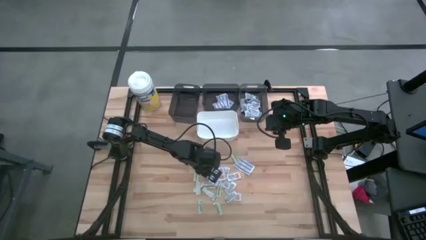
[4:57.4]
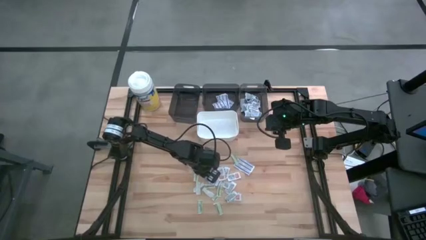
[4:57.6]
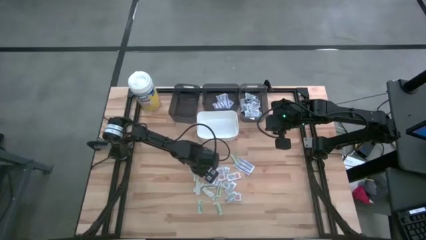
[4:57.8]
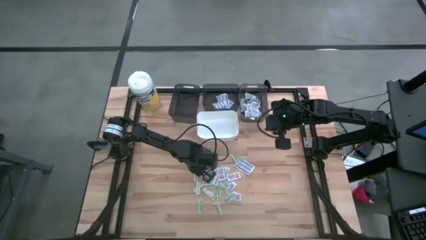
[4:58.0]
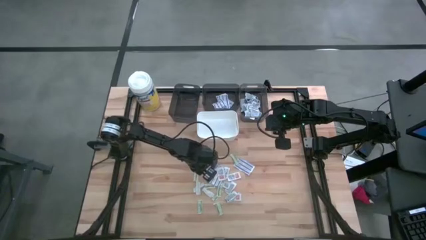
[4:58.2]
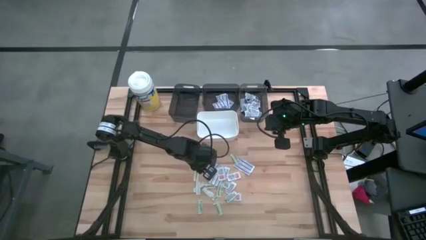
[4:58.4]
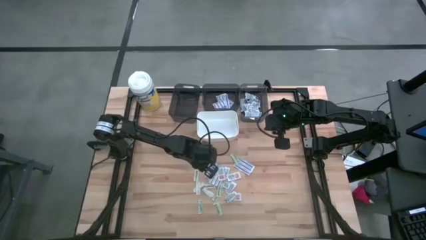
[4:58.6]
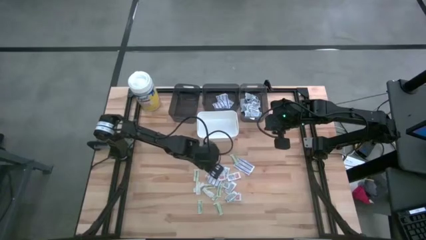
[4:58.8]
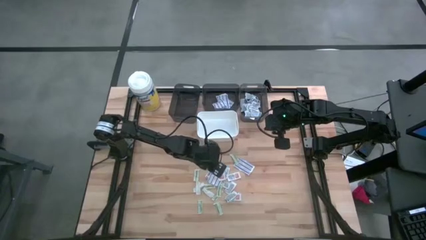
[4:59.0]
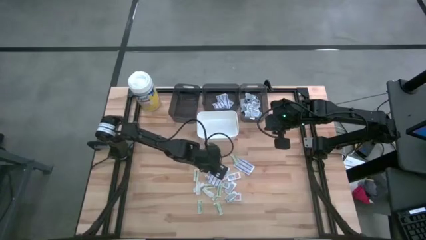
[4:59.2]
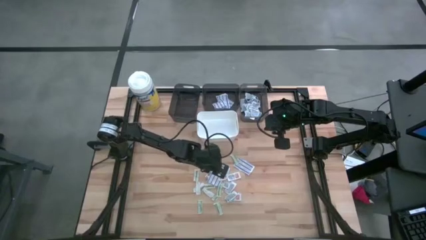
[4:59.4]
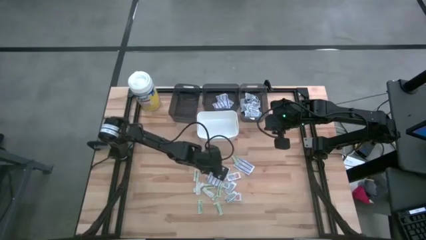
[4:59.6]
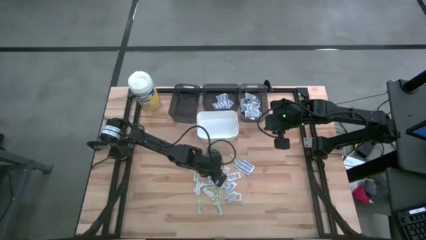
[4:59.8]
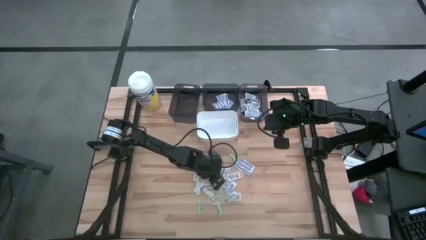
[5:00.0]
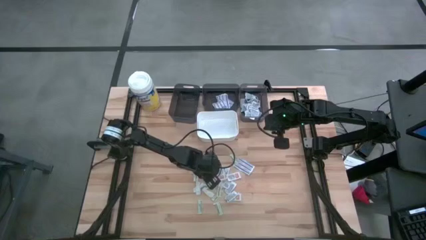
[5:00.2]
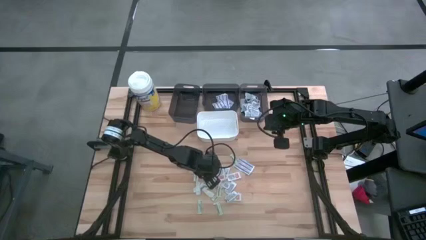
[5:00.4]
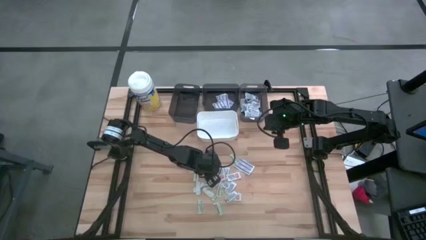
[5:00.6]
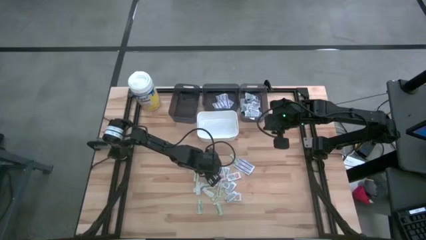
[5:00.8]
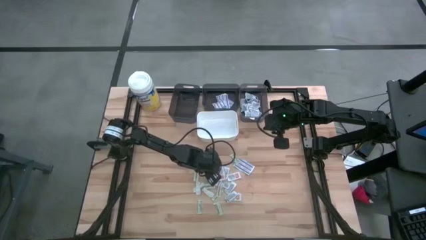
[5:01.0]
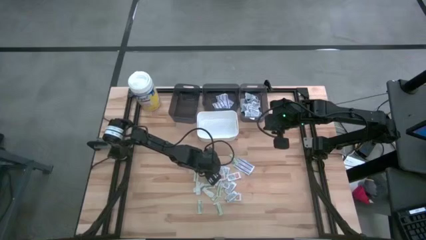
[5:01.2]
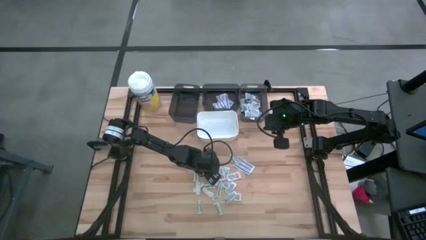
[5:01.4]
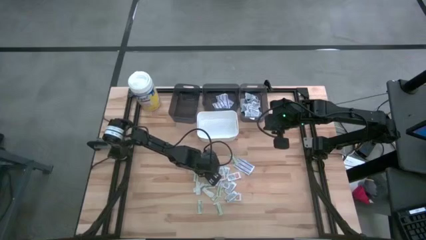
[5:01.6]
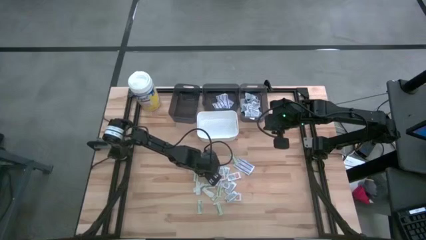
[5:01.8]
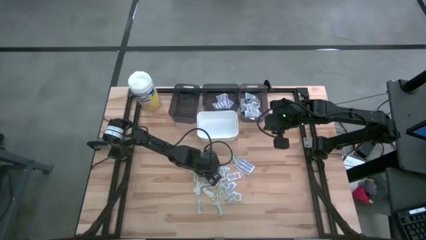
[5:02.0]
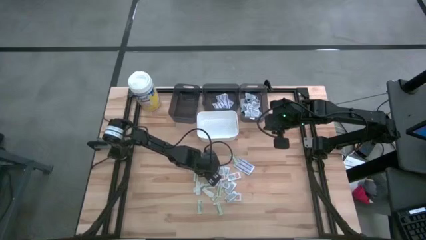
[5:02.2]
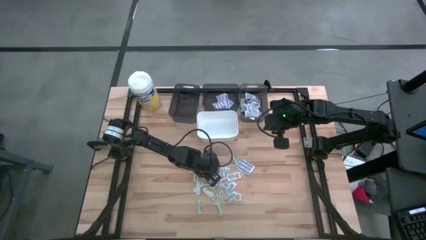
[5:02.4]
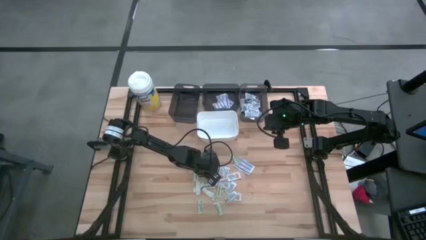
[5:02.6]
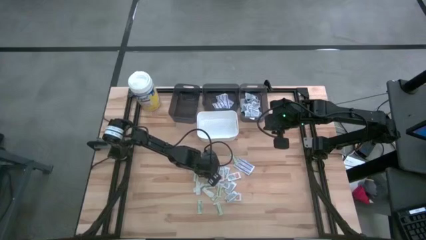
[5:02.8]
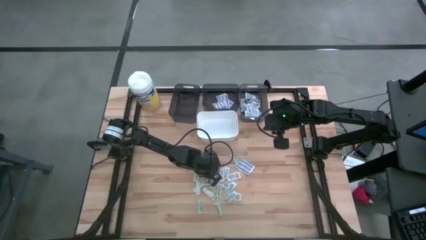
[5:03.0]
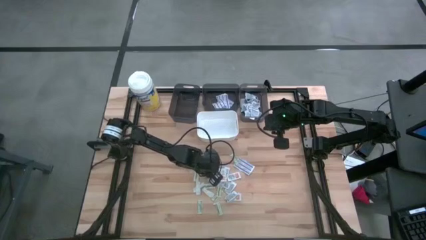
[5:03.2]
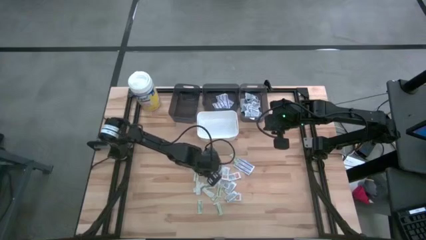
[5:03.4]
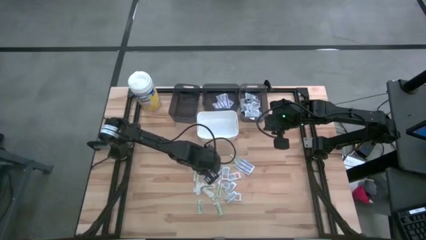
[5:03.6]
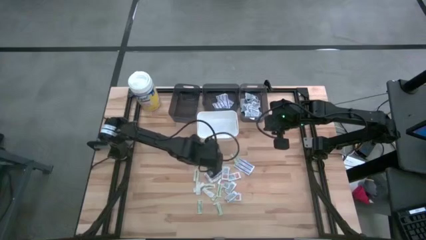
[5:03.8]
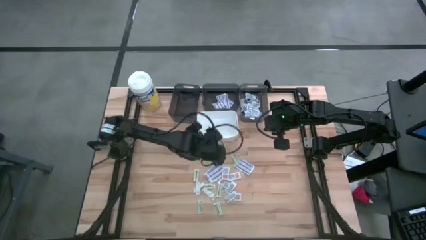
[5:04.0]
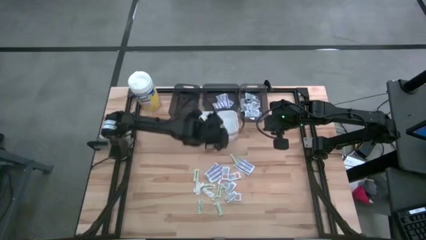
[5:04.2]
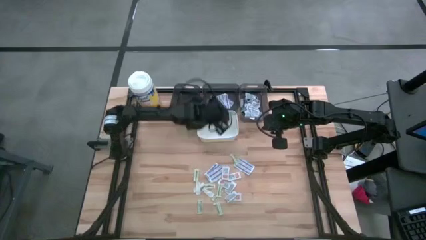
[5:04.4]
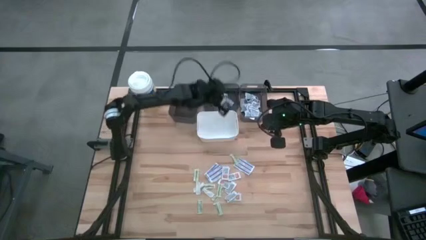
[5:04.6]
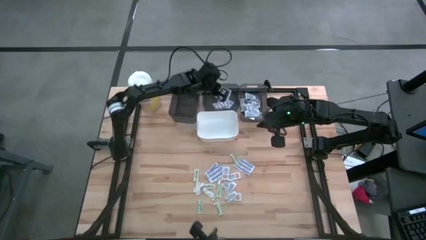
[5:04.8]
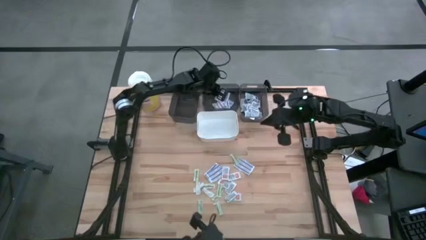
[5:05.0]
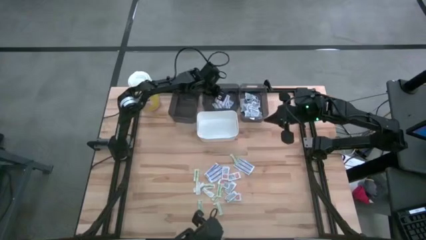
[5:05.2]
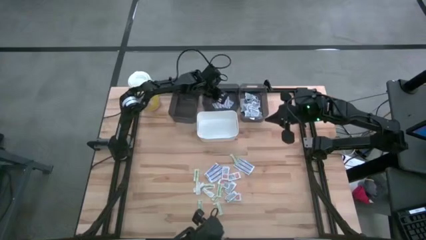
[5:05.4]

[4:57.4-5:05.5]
Task: Pick & Place First Aid Supplies
Put the blue bandage pack into the middle black bin

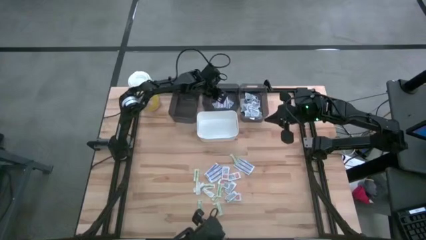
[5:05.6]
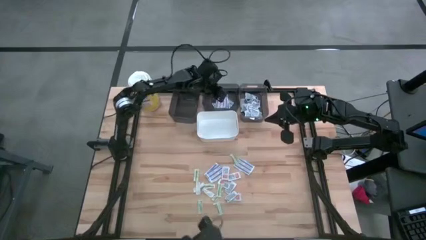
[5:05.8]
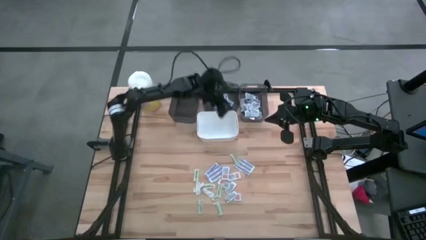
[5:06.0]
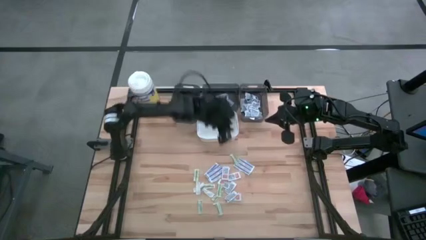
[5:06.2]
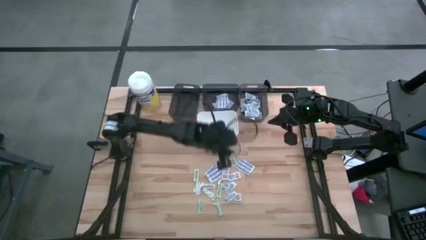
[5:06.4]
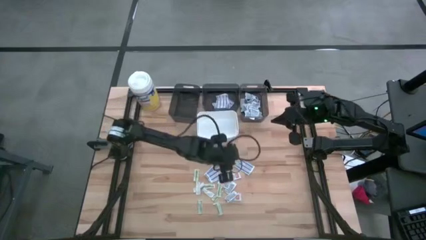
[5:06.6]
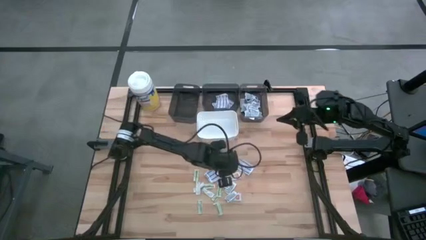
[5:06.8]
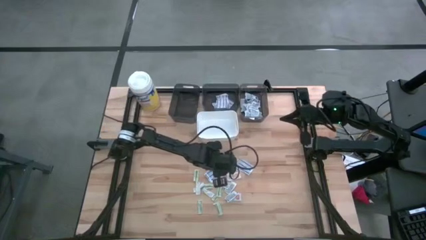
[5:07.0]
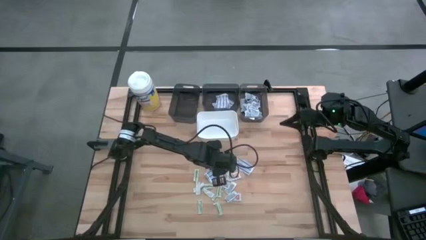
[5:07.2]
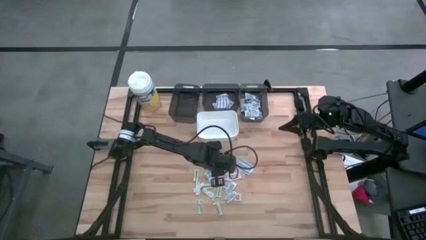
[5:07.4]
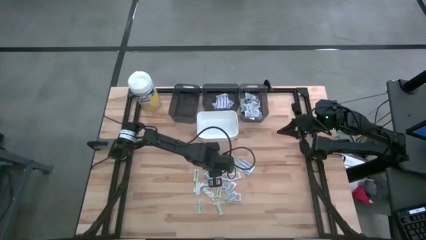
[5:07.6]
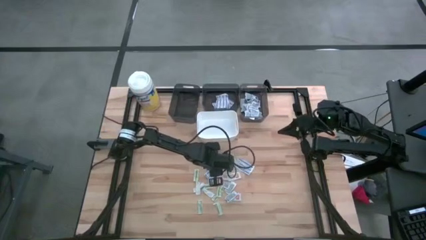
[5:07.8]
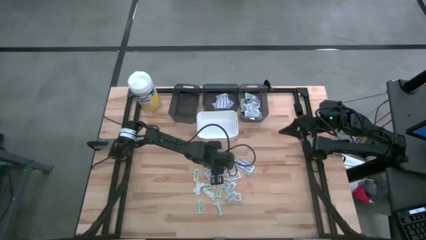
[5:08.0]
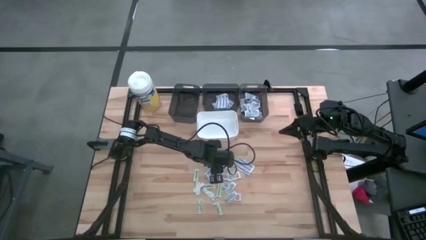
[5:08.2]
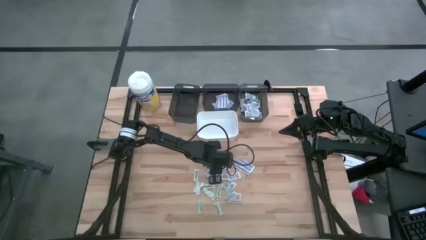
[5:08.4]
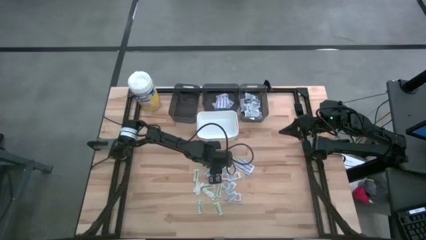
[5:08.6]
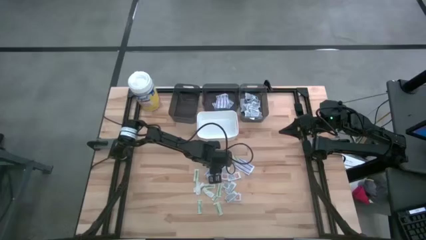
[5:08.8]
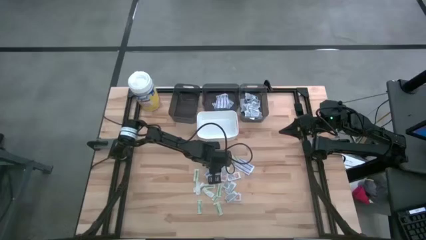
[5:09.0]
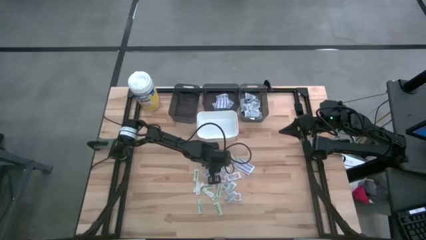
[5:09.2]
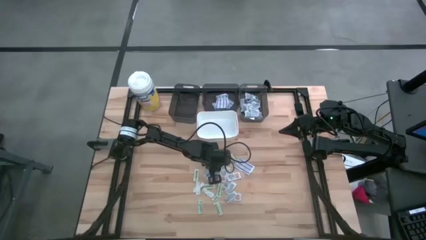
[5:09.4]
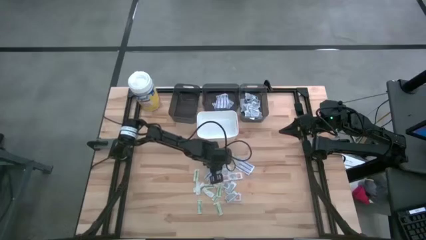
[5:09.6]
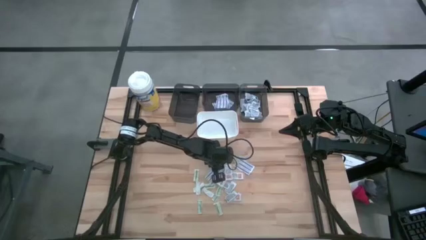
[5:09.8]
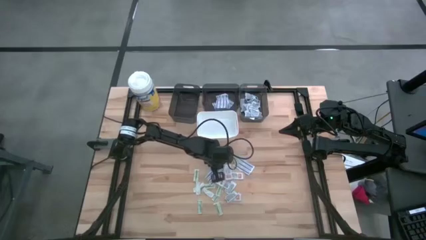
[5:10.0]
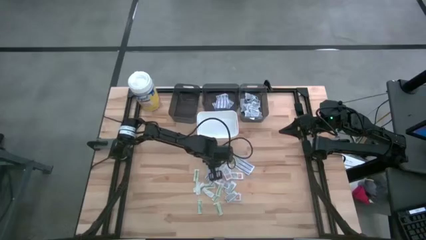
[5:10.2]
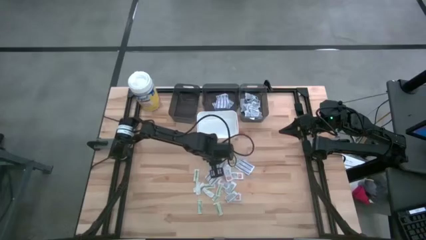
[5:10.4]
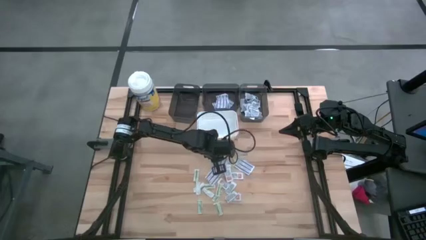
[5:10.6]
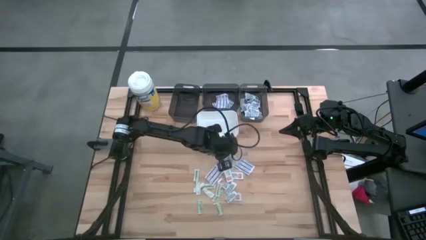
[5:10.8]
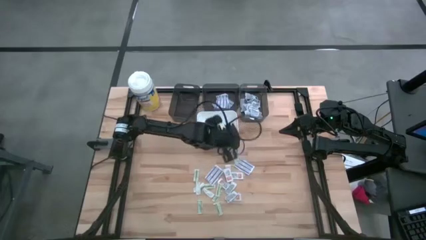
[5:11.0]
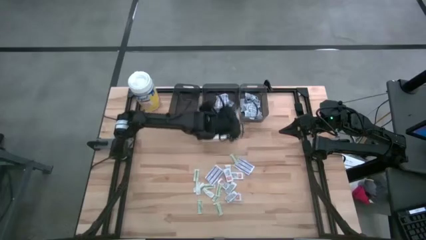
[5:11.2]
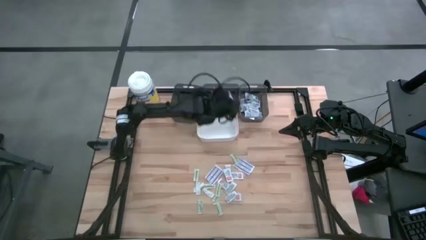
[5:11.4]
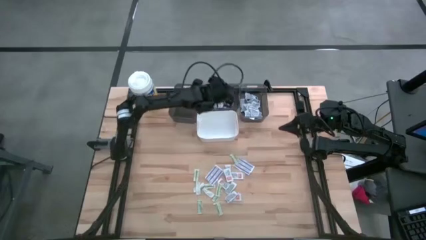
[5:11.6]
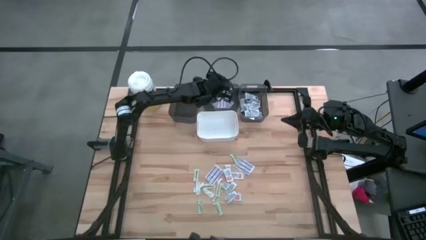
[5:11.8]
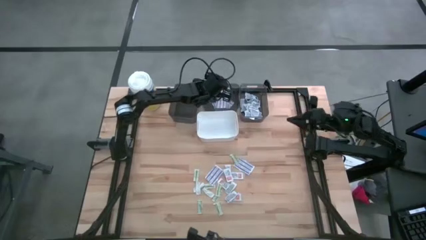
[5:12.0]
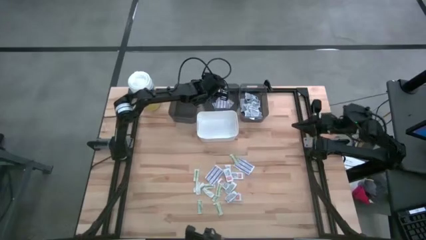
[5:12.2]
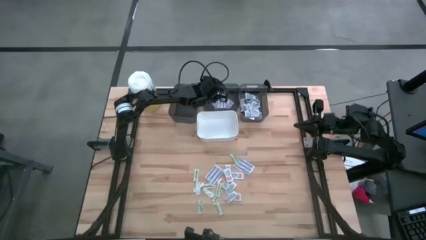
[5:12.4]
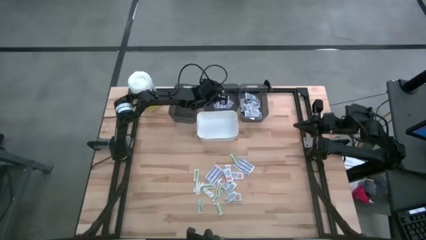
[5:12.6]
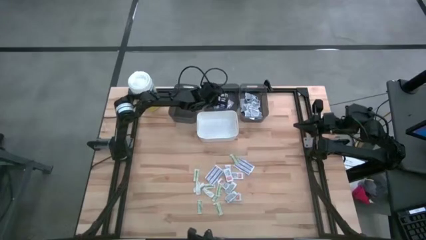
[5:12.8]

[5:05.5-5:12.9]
Put the blue bandage pack into the middle black bin
